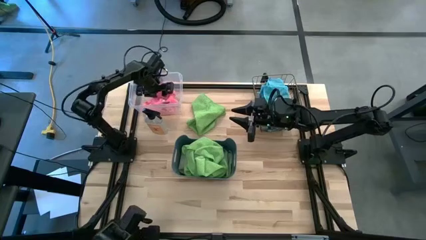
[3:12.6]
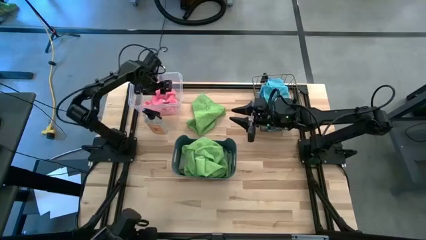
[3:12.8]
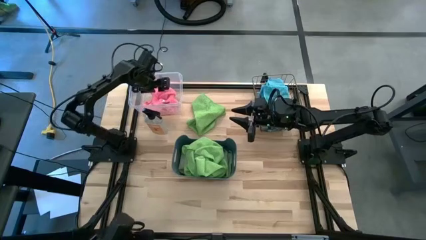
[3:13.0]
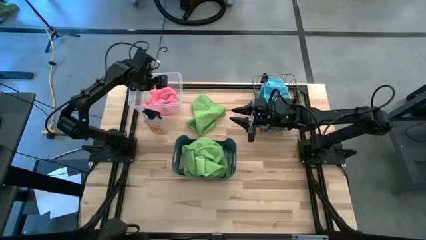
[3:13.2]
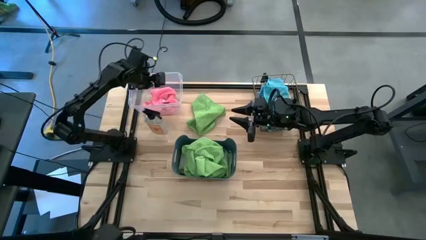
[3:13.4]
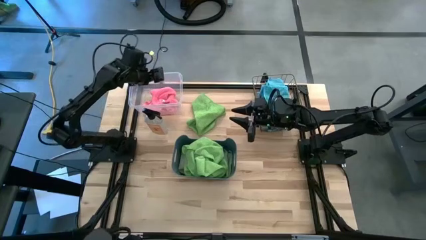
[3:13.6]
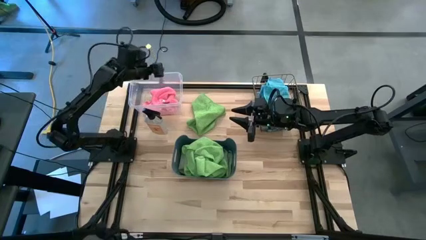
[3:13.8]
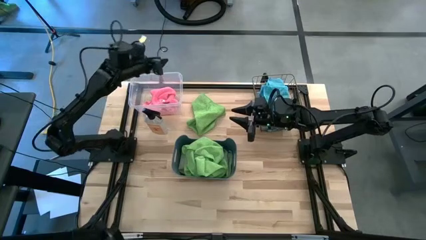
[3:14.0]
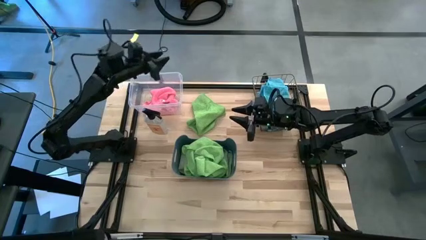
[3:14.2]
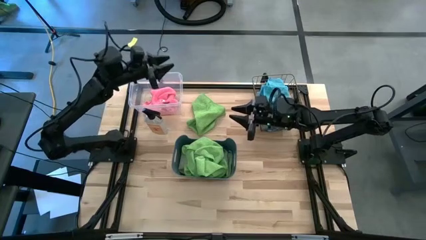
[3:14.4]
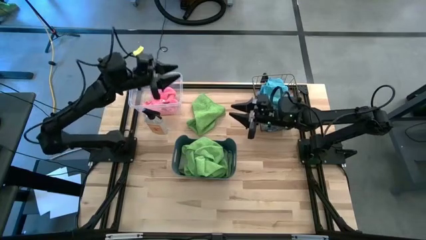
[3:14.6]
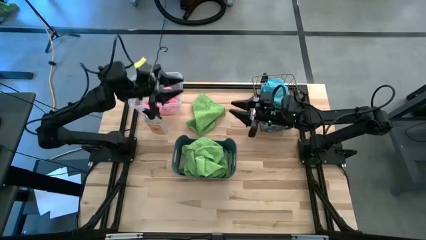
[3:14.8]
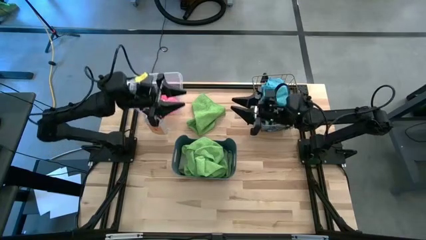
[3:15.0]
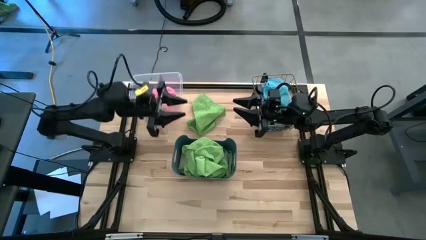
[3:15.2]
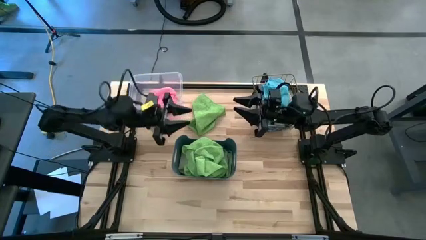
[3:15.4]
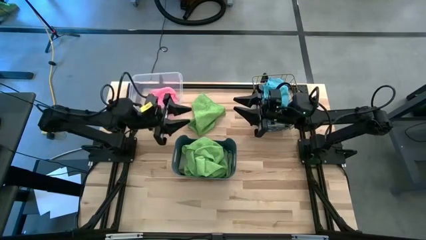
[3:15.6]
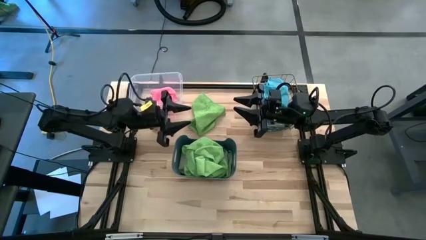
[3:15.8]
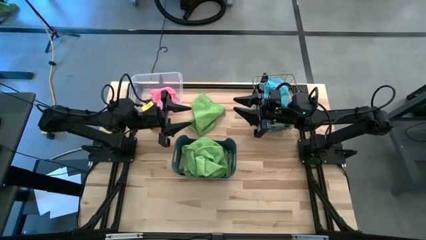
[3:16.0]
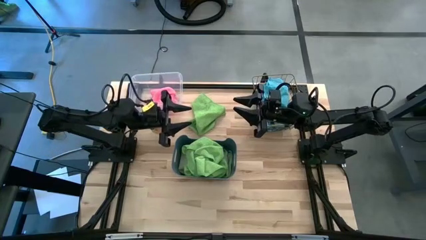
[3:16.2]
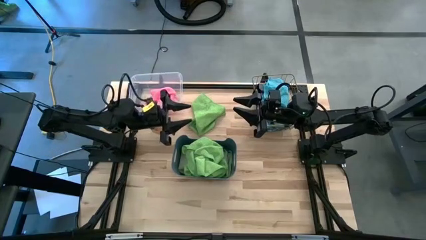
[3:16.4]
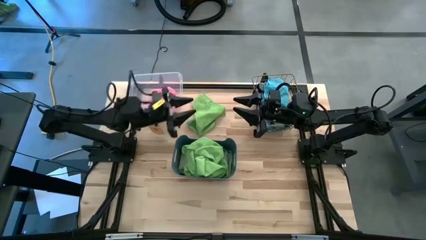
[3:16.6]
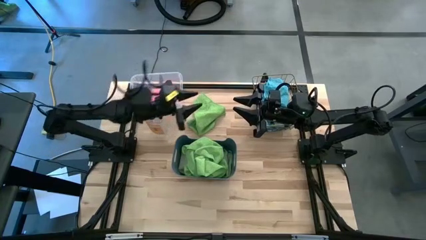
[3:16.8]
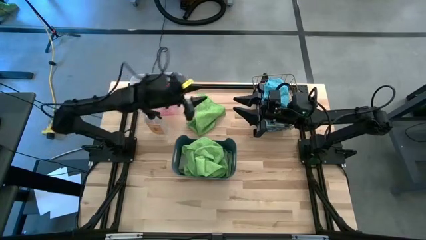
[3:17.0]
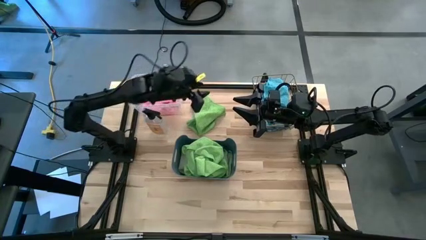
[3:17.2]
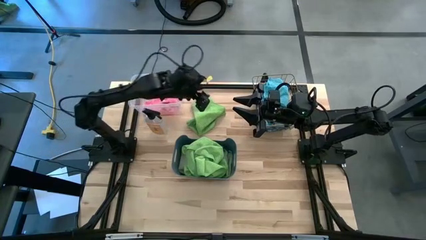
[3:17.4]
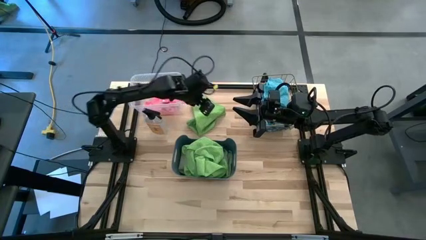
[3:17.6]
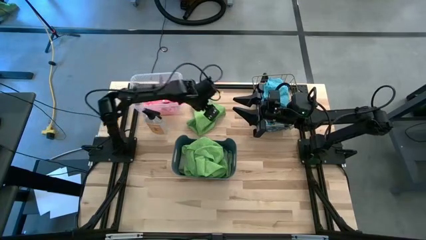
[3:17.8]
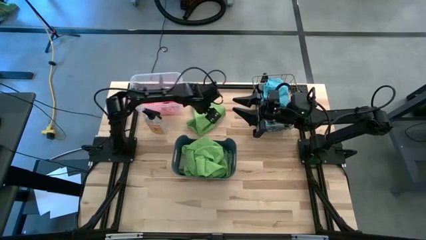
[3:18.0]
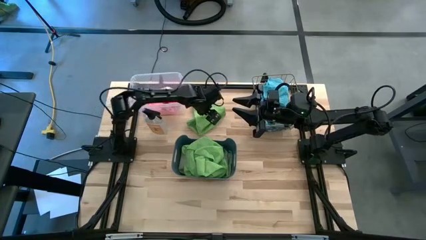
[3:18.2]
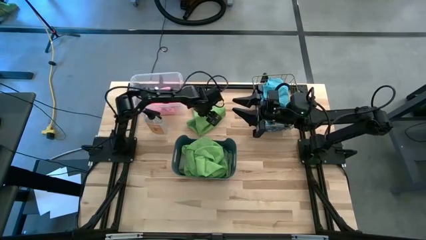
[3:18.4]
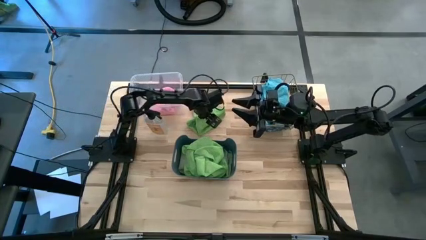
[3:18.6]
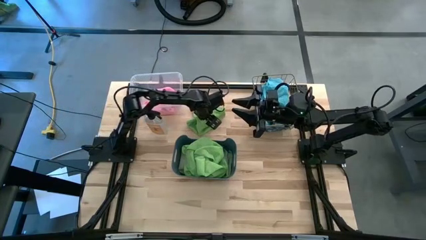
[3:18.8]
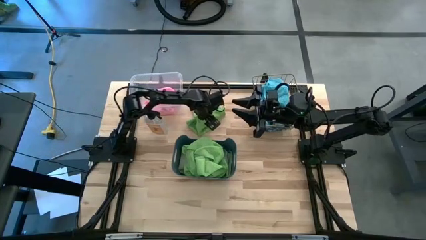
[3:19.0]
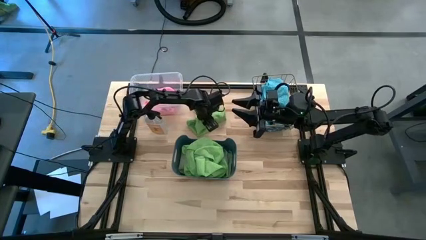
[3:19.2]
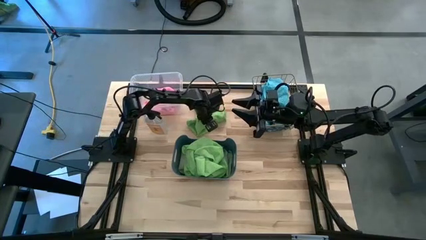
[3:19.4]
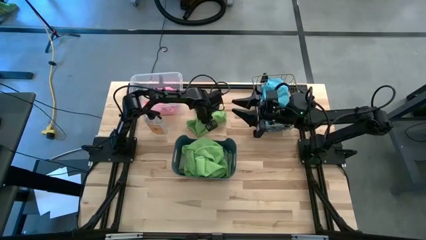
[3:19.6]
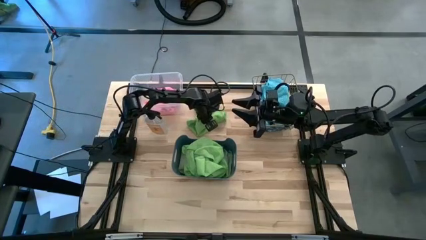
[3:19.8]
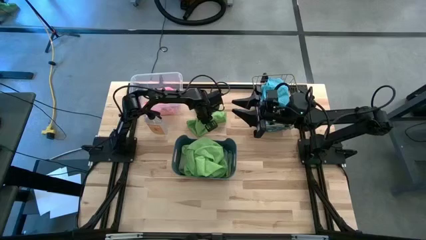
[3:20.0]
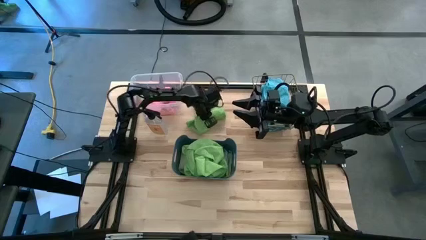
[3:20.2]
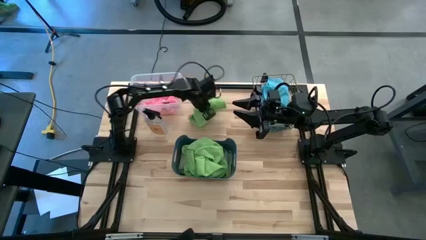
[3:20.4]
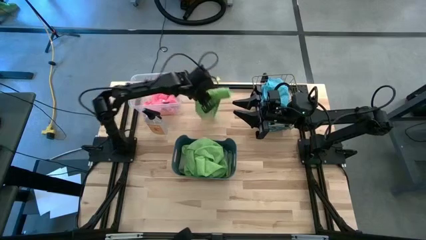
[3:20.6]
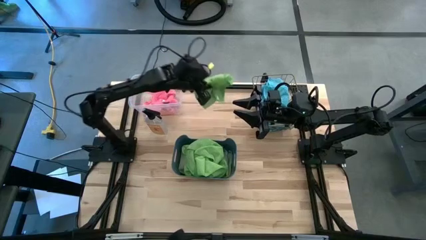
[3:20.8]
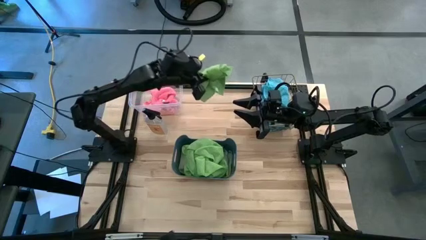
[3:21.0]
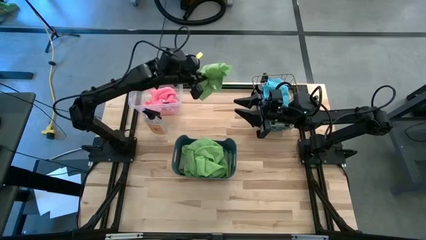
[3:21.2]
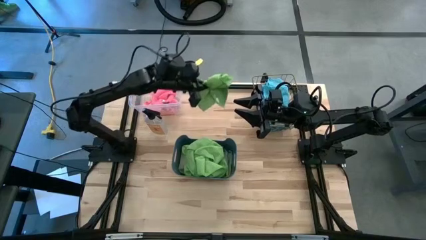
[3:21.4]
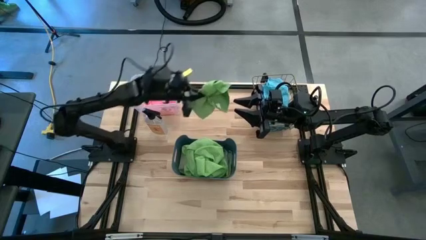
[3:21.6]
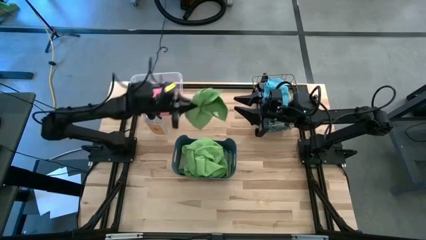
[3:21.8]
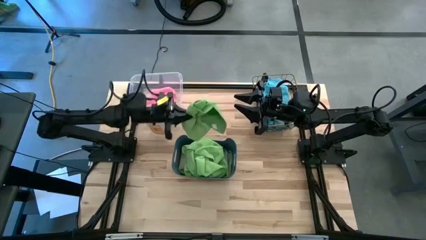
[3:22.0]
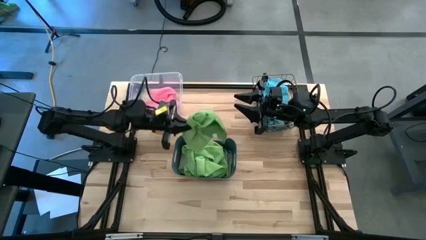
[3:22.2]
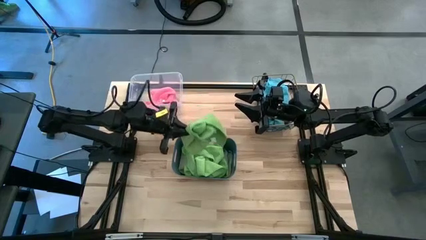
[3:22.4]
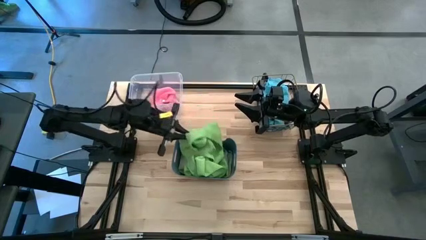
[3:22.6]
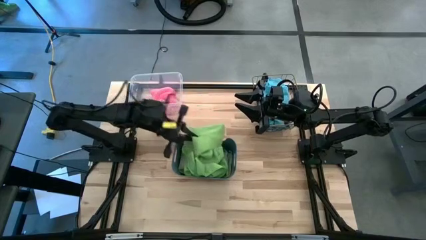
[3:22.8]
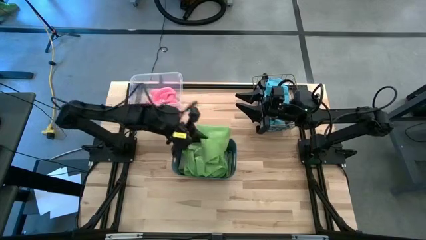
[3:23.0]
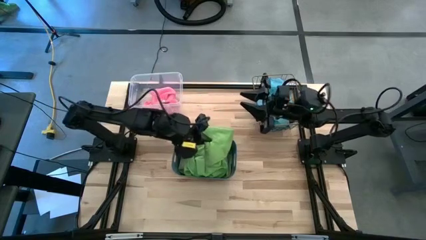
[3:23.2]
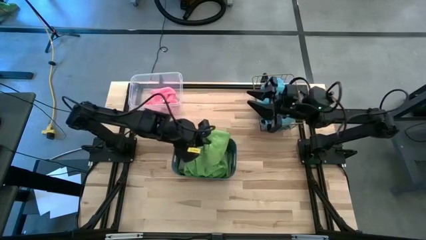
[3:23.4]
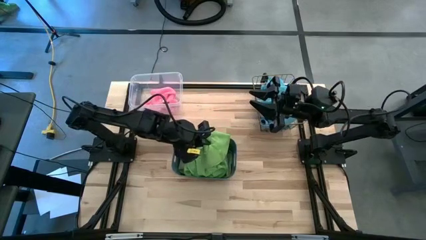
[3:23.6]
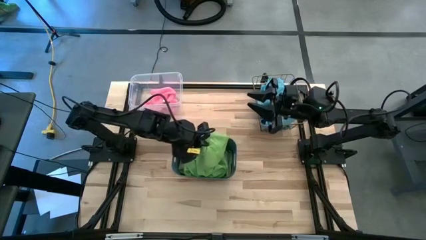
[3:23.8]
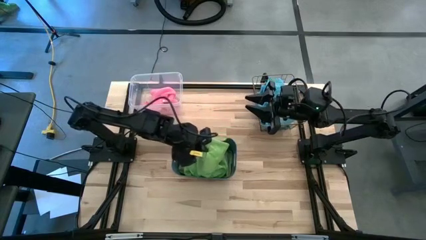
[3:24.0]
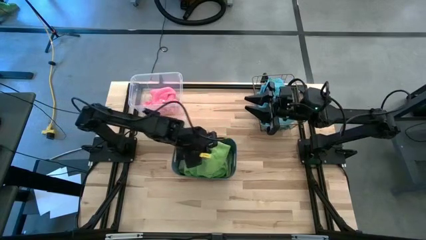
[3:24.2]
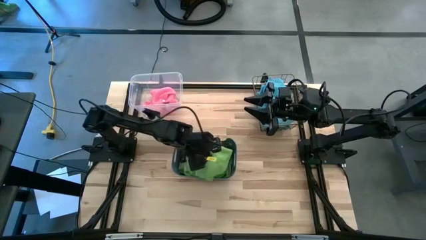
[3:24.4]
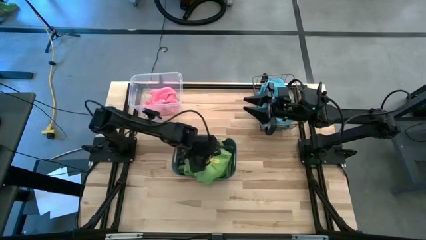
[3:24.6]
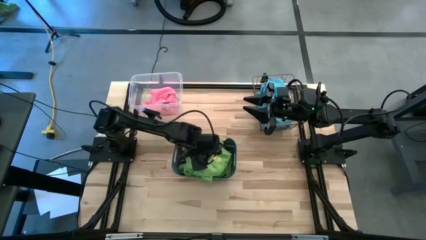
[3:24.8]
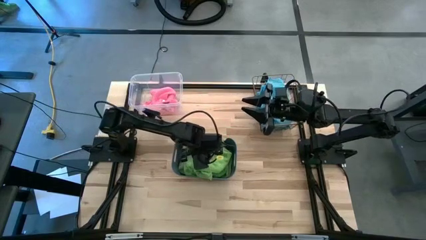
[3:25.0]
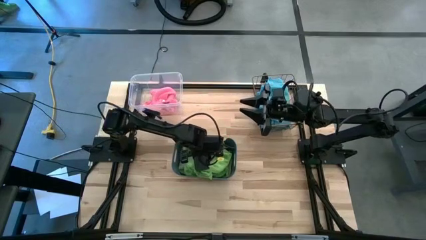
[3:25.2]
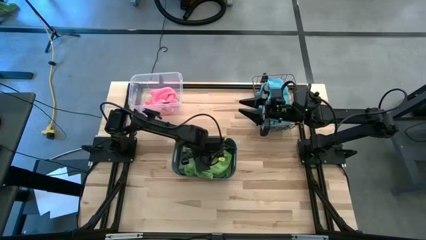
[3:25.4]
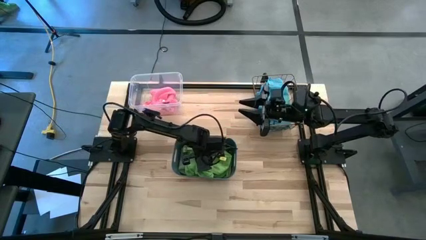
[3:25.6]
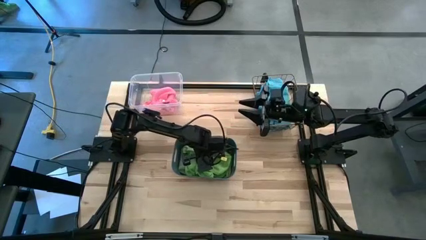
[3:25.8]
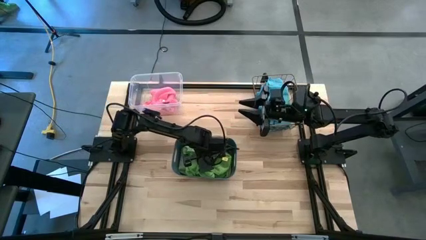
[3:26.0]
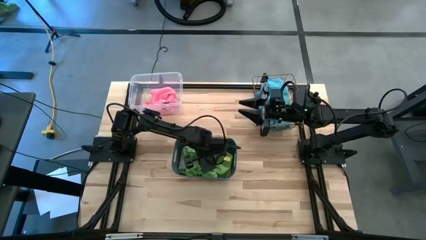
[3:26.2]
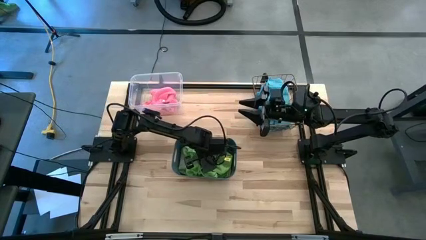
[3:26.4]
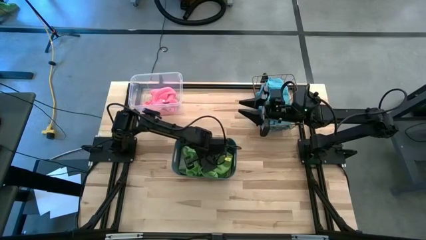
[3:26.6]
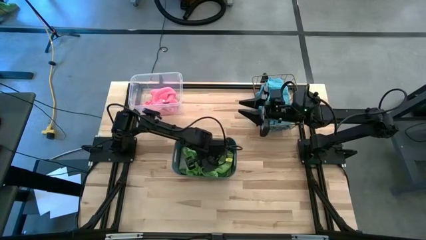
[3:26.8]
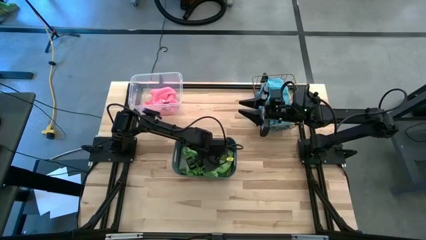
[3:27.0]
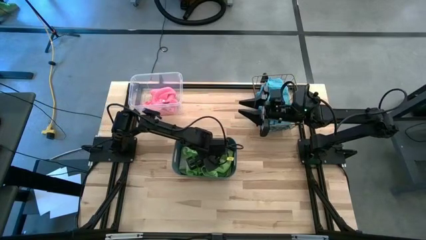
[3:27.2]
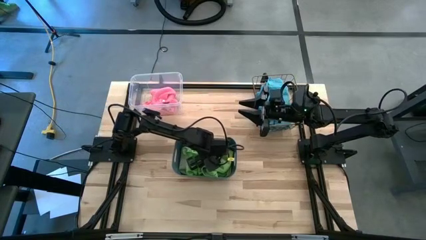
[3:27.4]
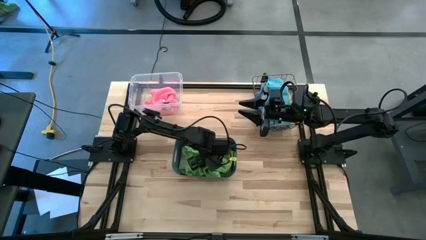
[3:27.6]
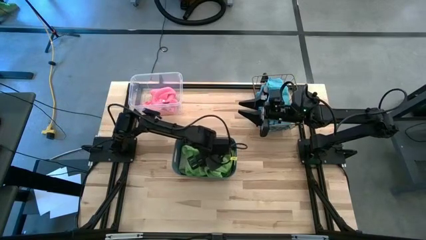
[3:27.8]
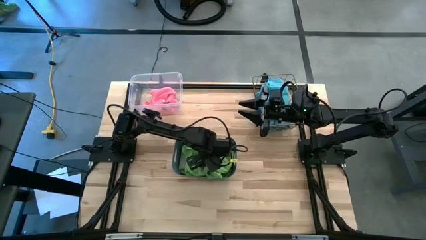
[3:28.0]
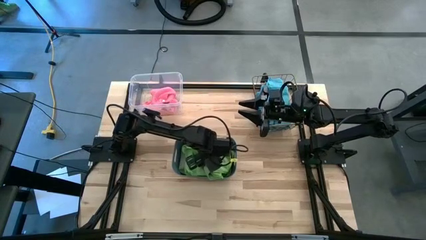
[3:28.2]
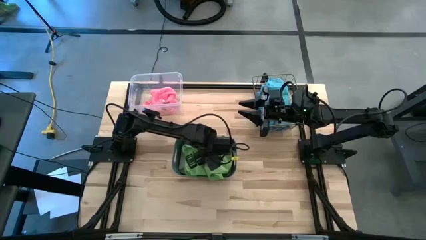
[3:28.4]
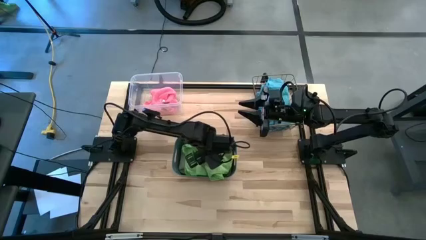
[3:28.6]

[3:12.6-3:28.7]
Task: Sort microfiber towel by color & place in baskets
Put the green microfiber cloth into the blue bin
